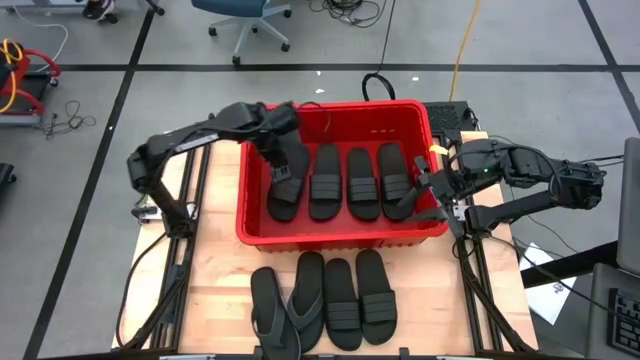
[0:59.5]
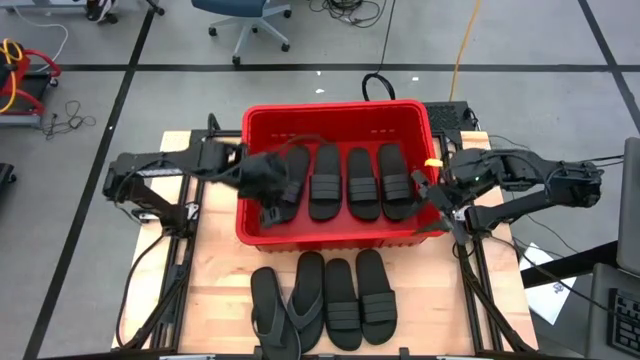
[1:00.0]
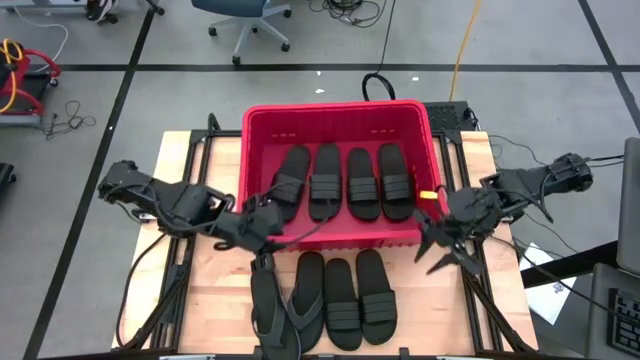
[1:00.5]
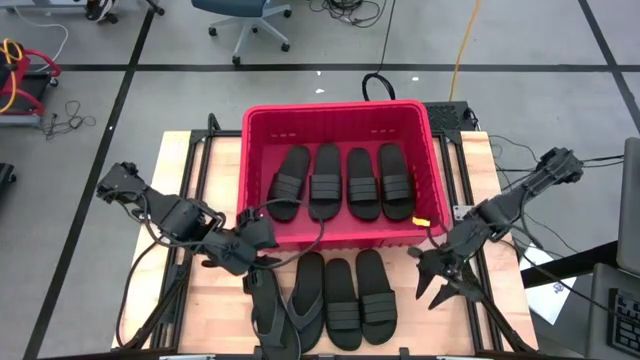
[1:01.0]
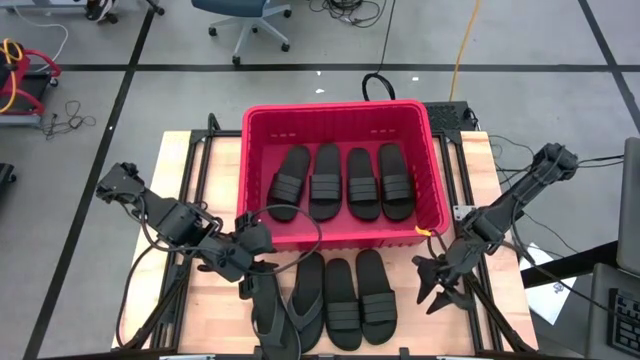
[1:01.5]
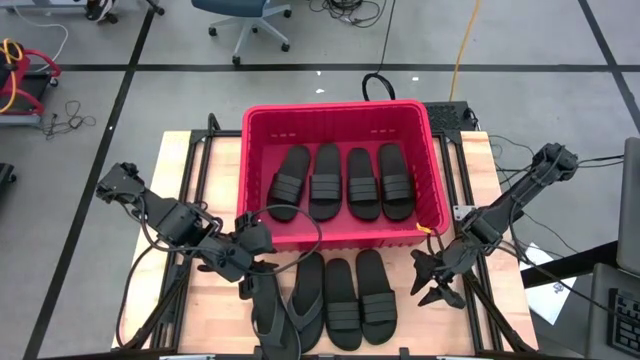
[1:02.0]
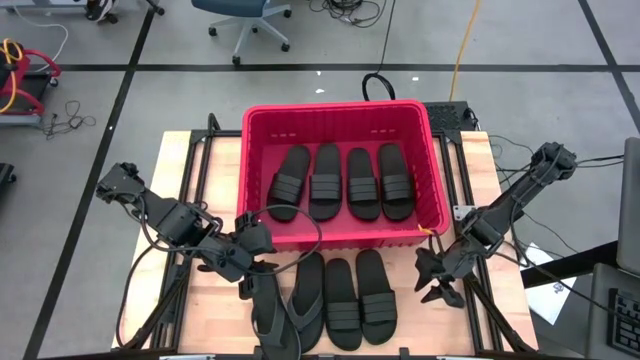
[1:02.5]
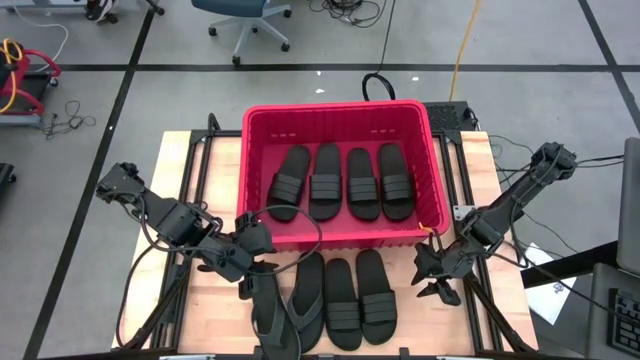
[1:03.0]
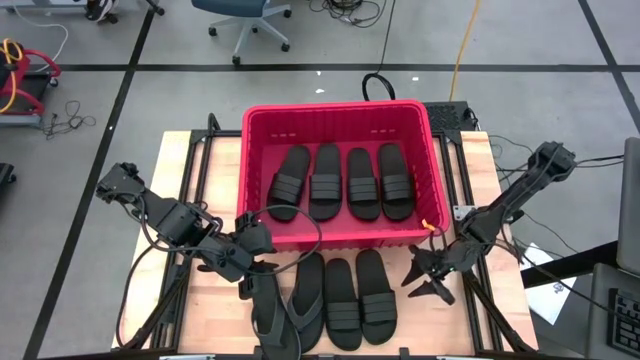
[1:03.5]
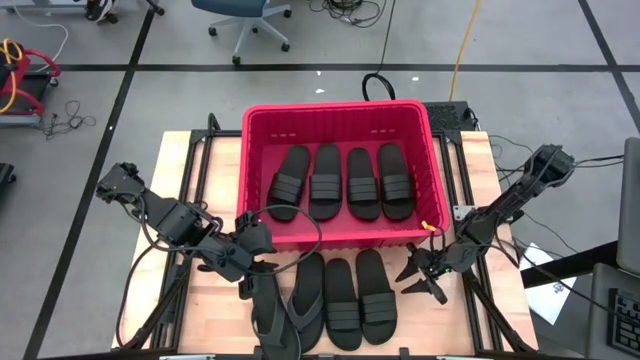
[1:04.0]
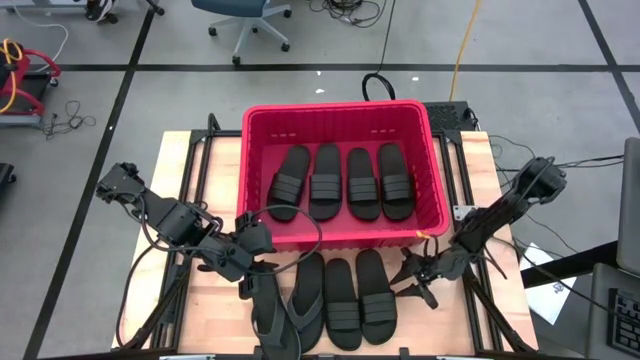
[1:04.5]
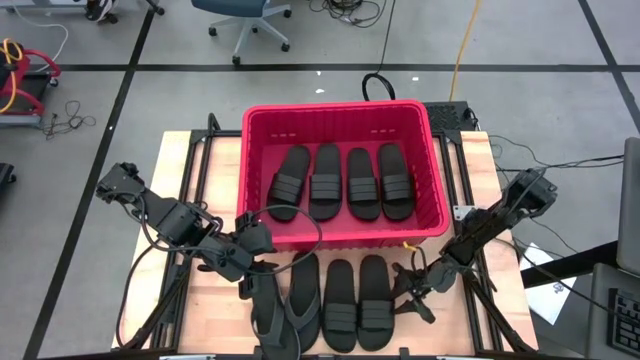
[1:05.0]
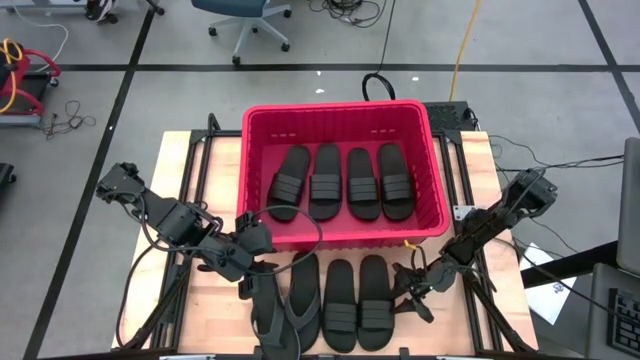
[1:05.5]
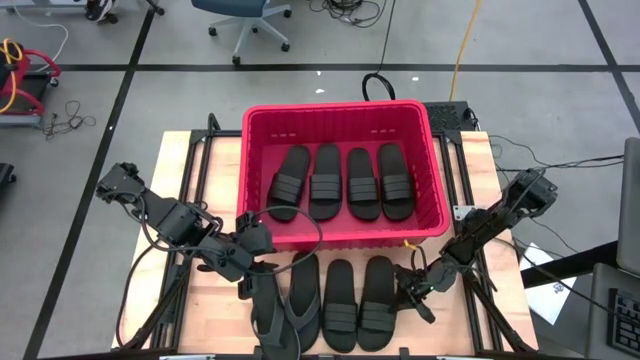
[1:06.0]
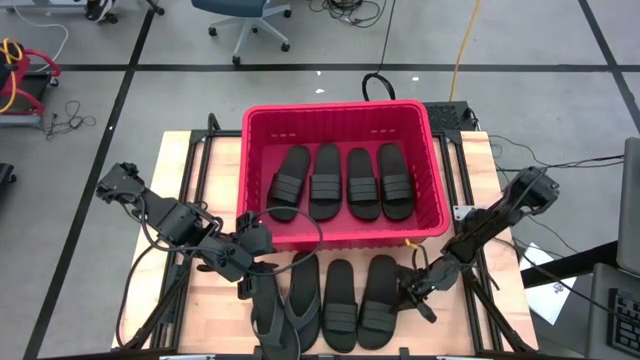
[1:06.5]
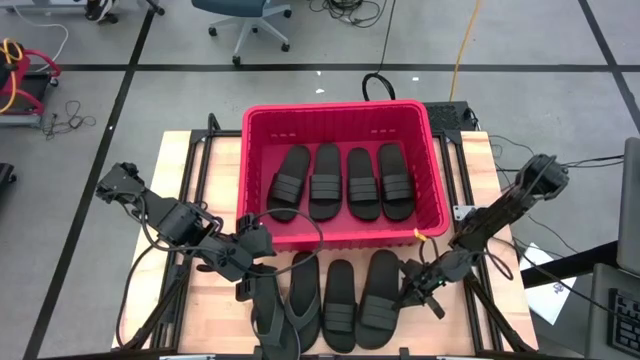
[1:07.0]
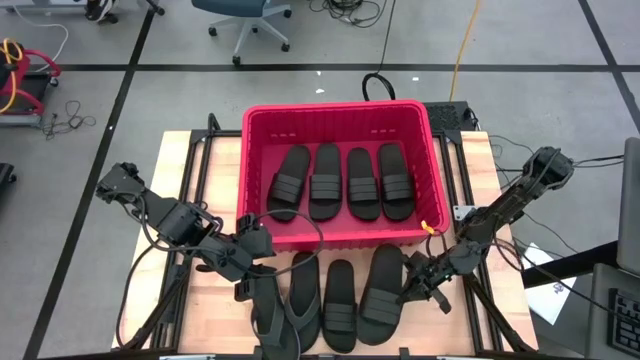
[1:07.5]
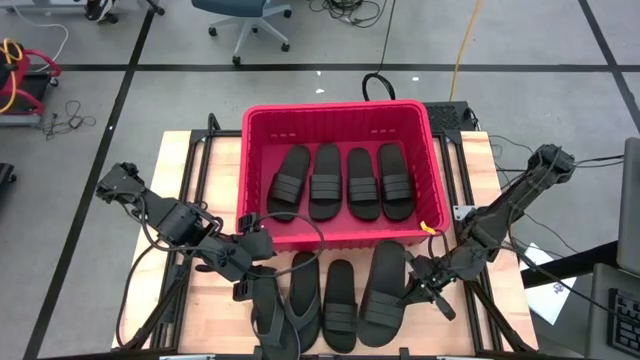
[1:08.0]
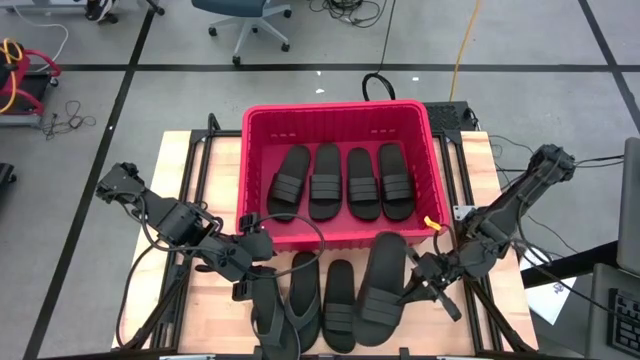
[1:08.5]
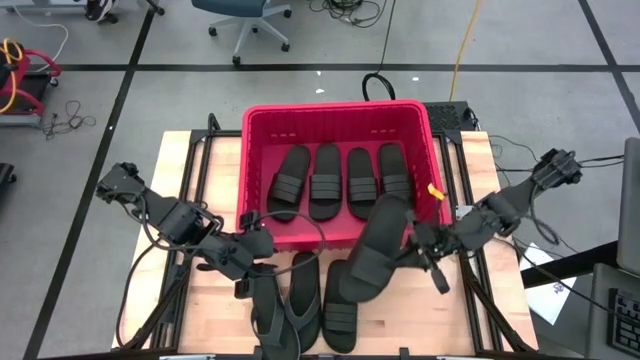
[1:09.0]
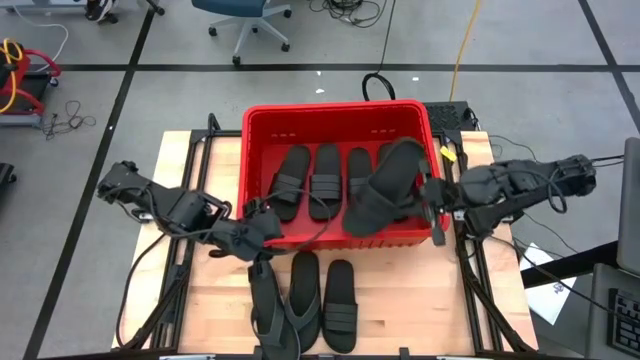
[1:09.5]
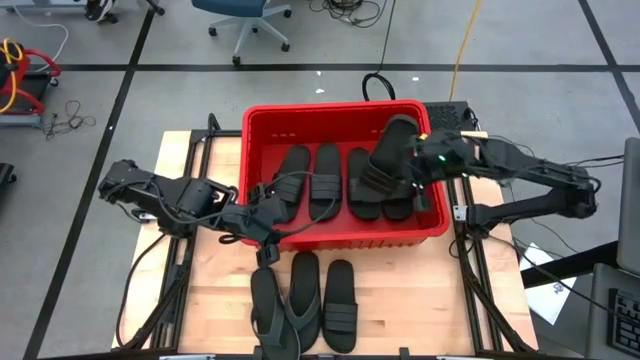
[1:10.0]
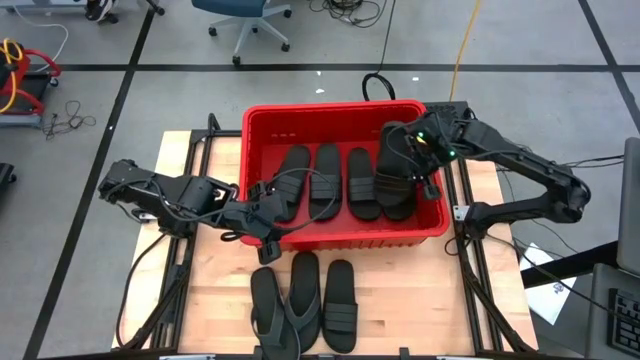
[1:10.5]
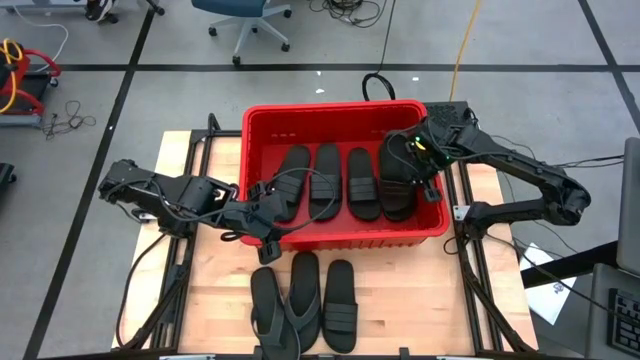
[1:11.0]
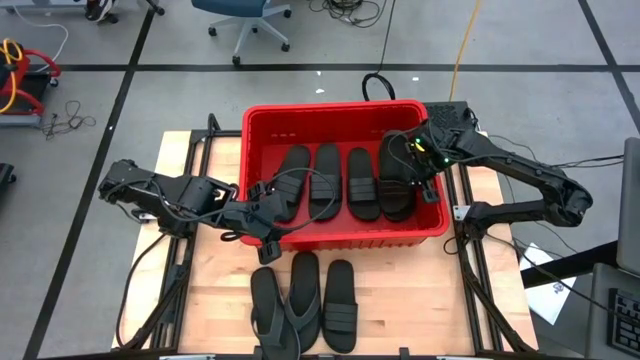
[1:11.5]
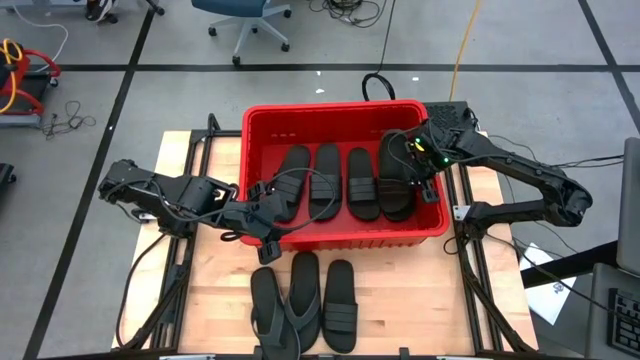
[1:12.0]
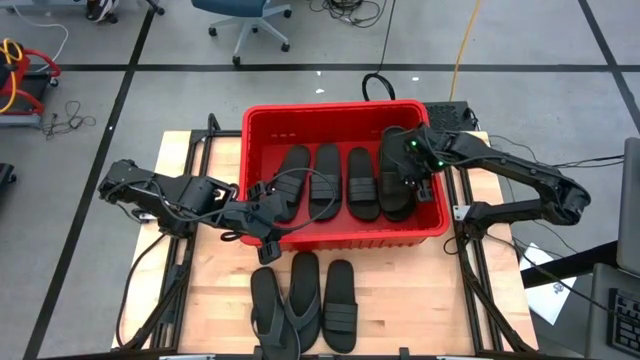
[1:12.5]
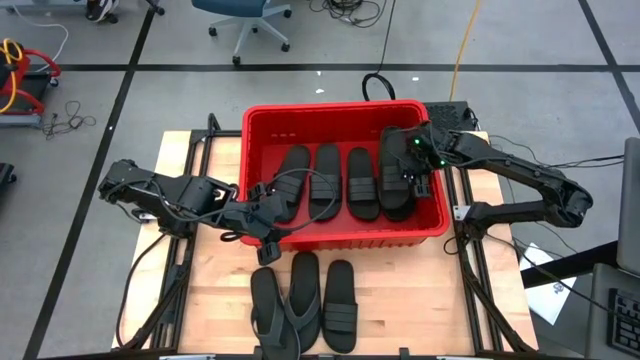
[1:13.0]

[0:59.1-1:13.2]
Task: Pick and place slides into bin
Put the black slide into the red bin

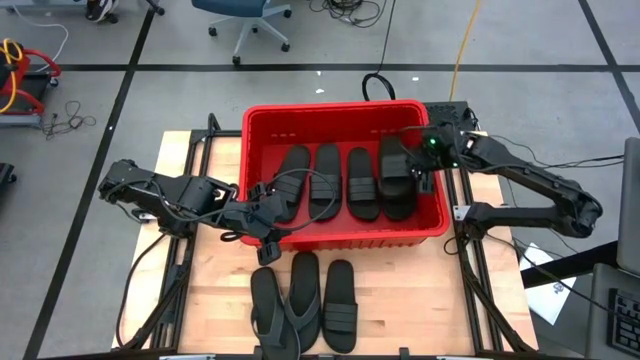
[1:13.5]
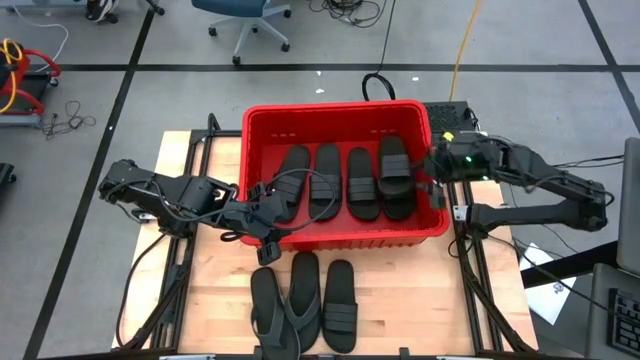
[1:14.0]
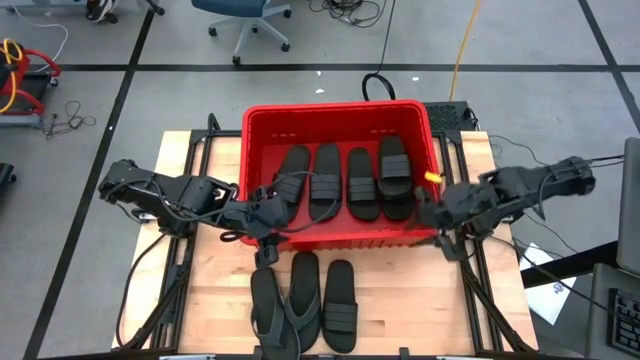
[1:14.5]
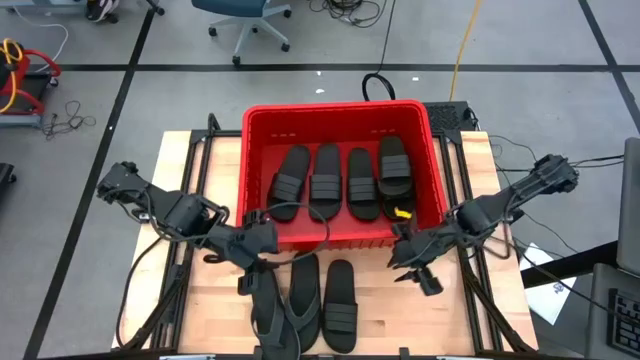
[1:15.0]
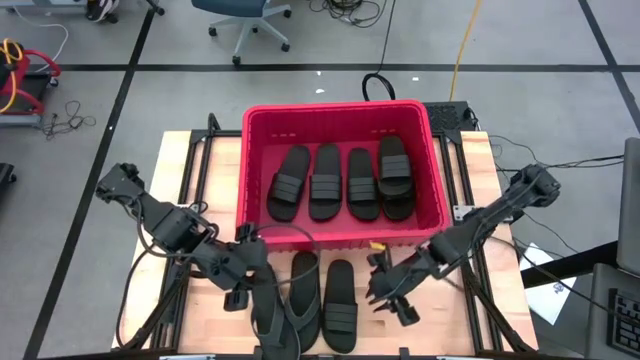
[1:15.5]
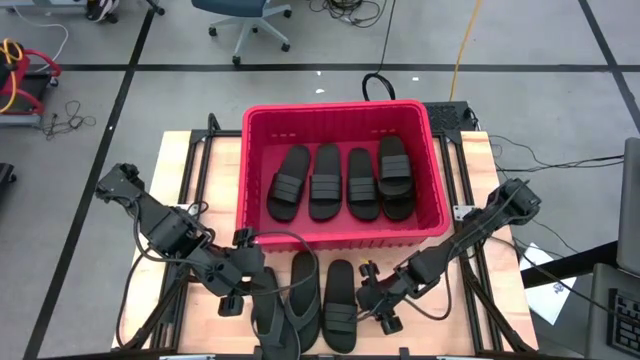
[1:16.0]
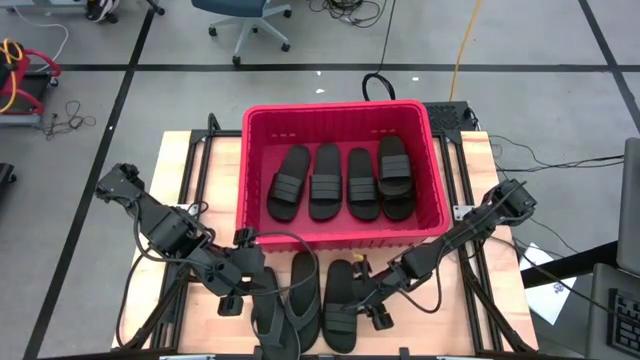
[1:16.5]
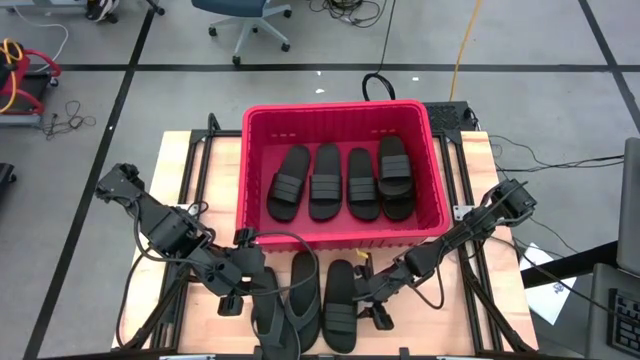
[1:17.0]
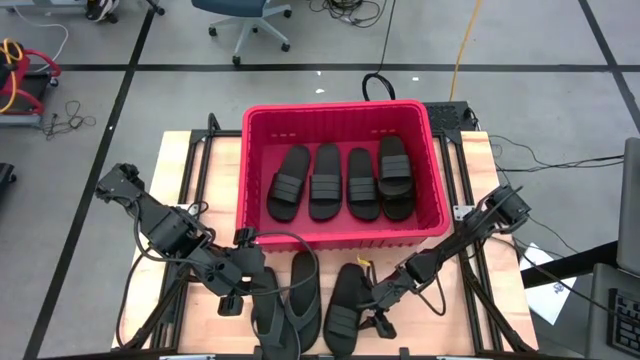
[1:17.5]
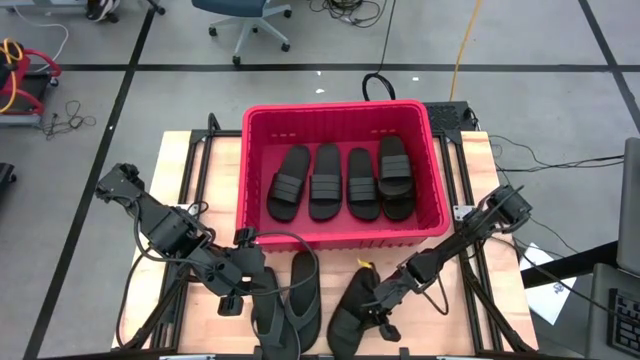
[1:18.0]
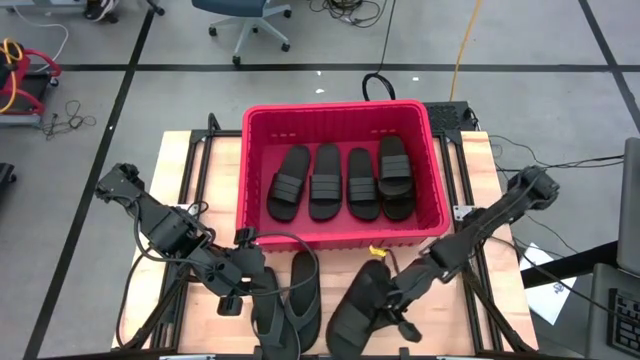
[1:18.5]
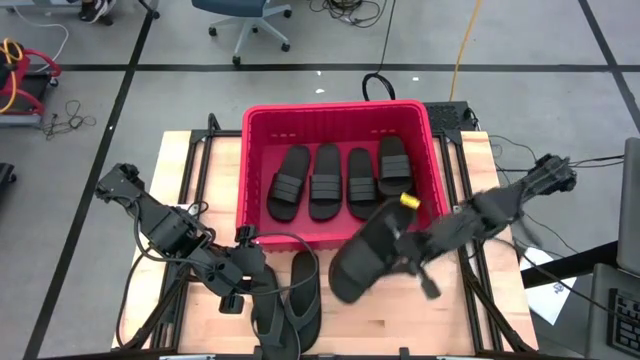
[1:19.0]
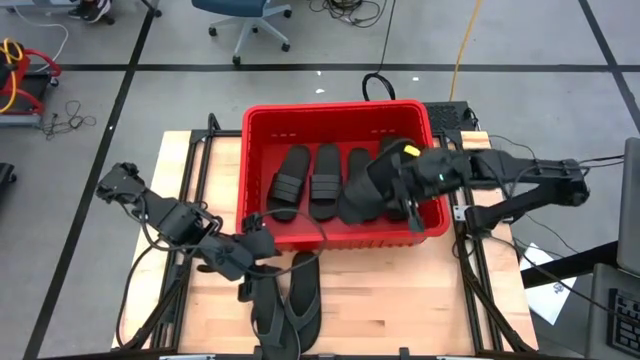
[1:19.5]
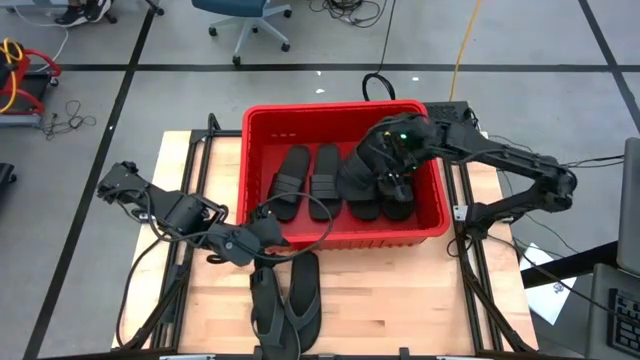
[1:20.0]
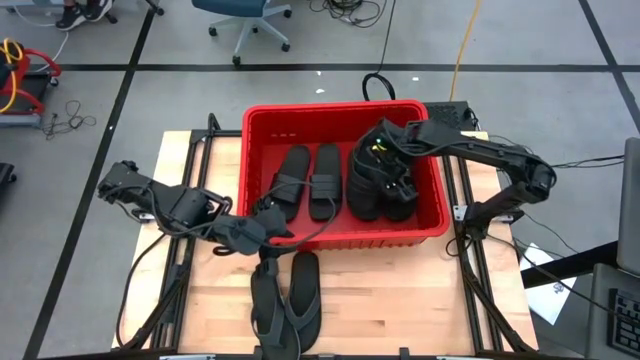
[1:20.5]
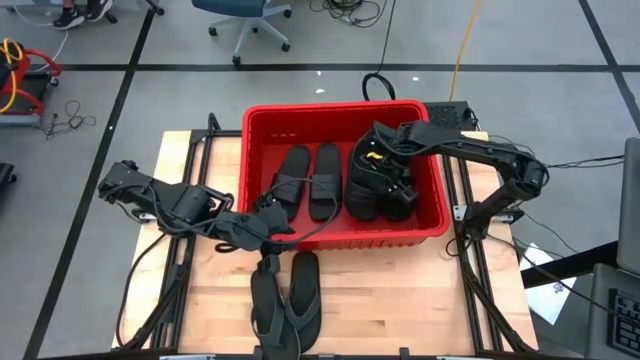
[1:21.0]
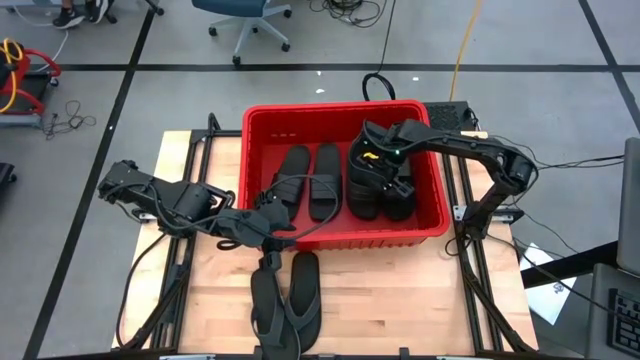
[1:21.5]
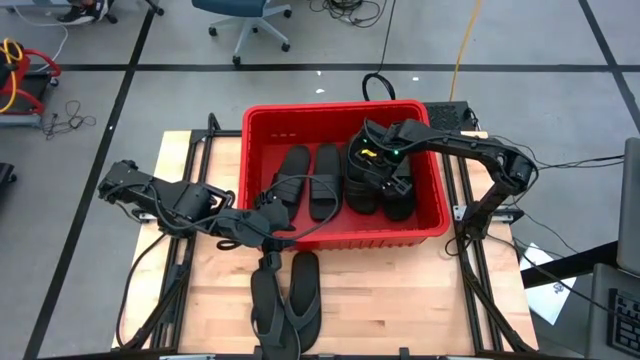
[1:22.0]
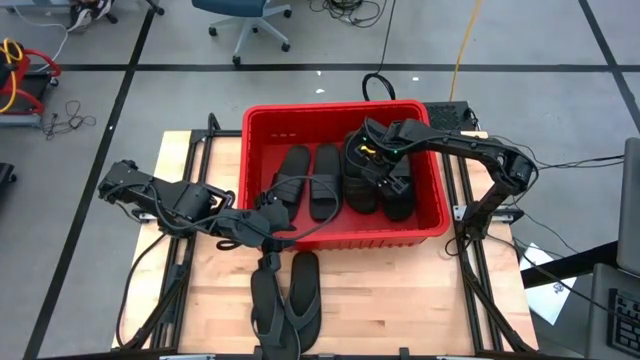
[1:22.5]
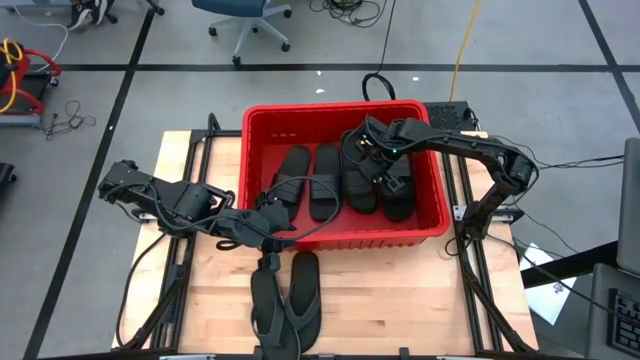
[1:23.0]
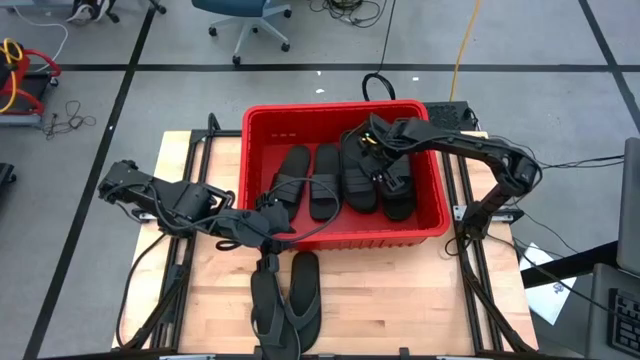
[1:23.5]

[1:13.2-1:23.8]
Put the black slide into the red bin
